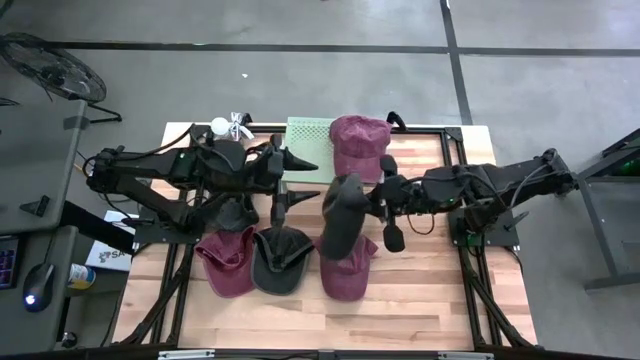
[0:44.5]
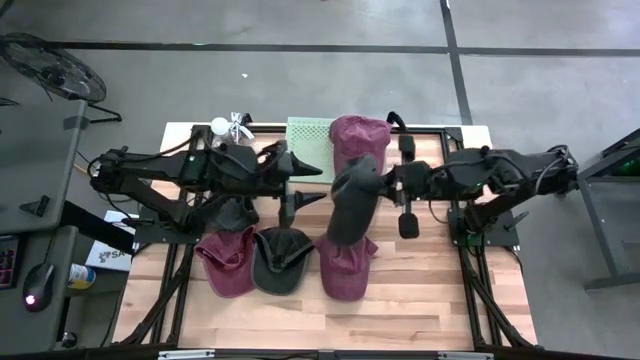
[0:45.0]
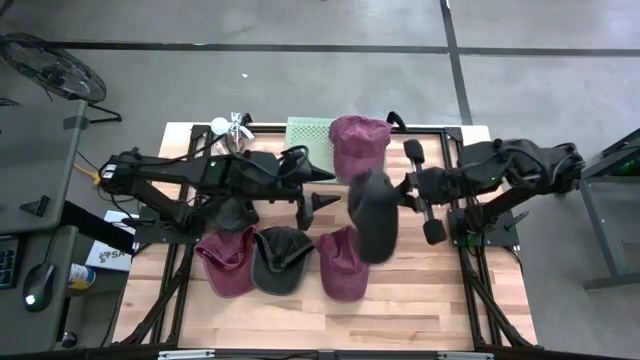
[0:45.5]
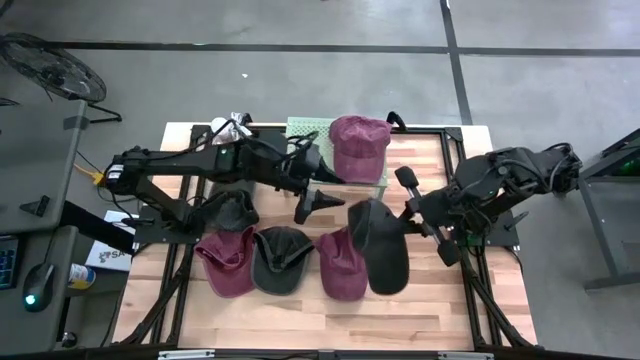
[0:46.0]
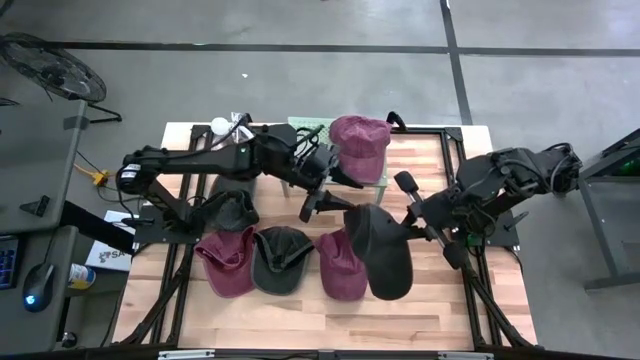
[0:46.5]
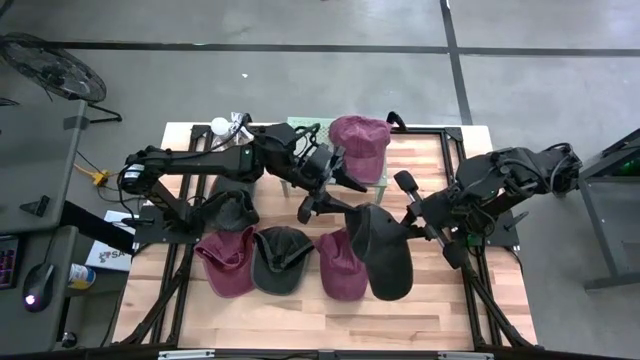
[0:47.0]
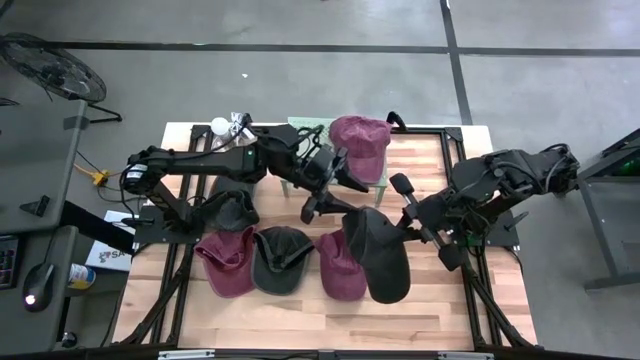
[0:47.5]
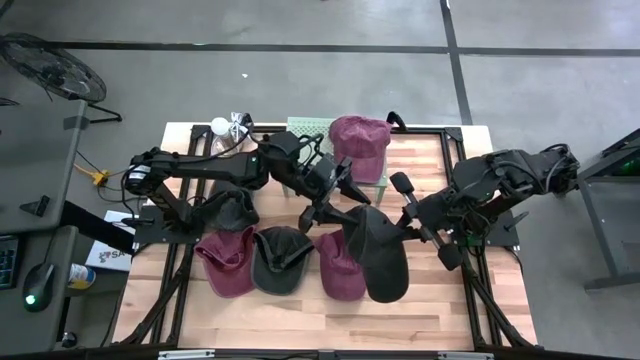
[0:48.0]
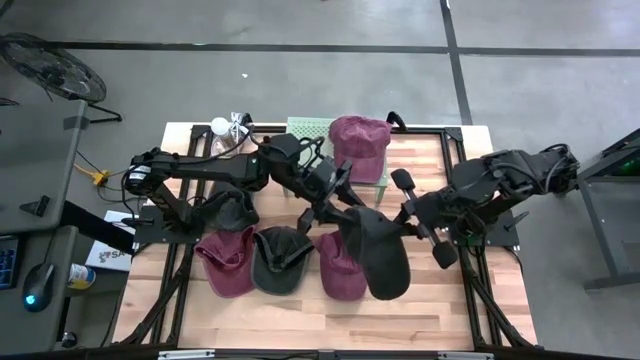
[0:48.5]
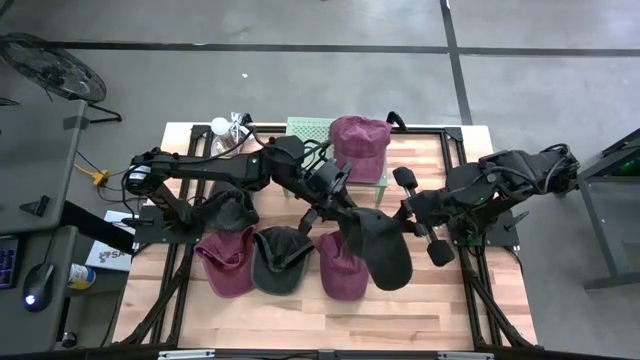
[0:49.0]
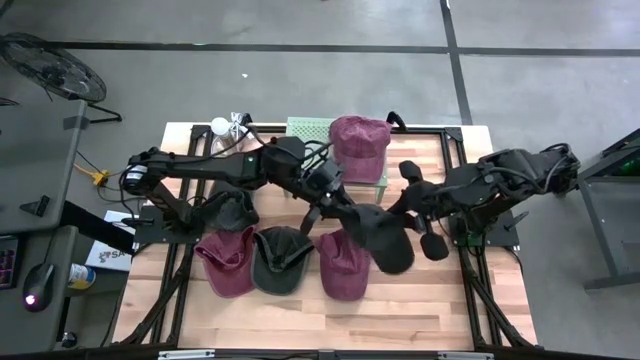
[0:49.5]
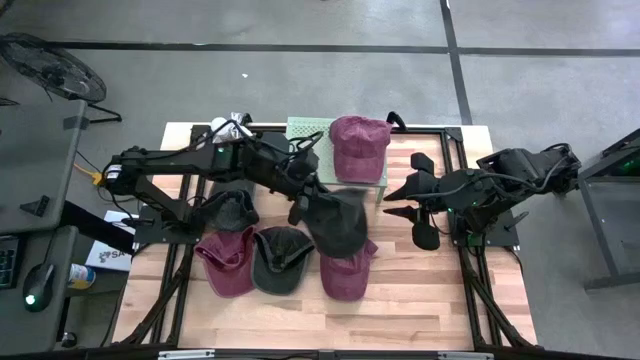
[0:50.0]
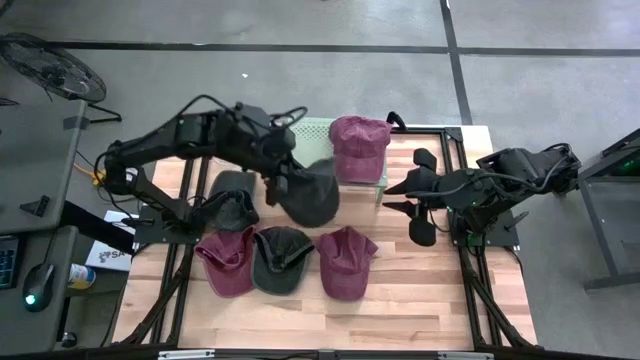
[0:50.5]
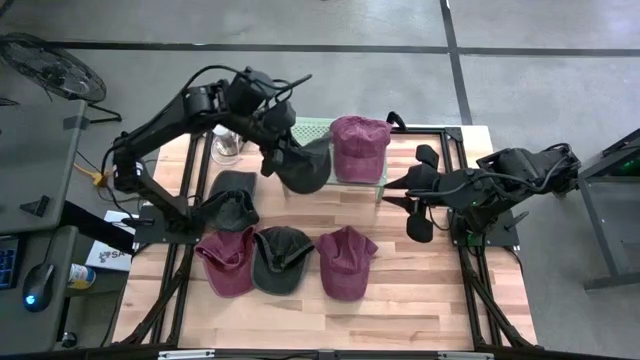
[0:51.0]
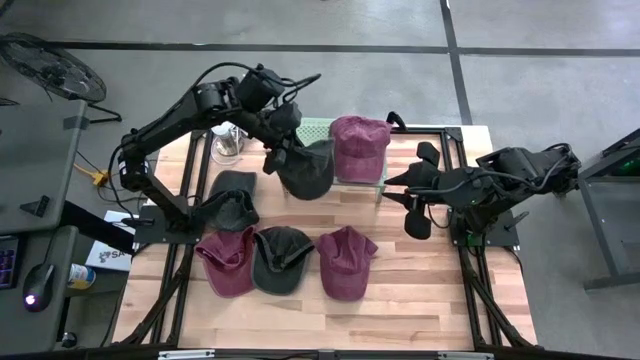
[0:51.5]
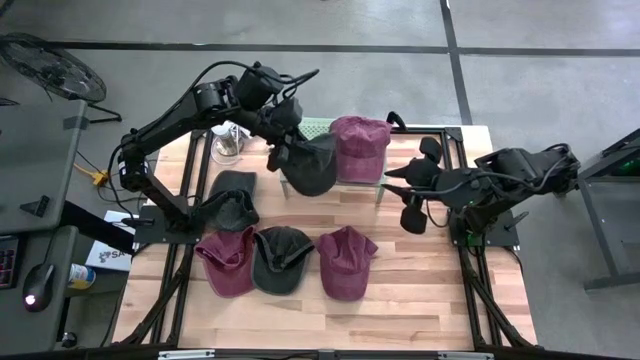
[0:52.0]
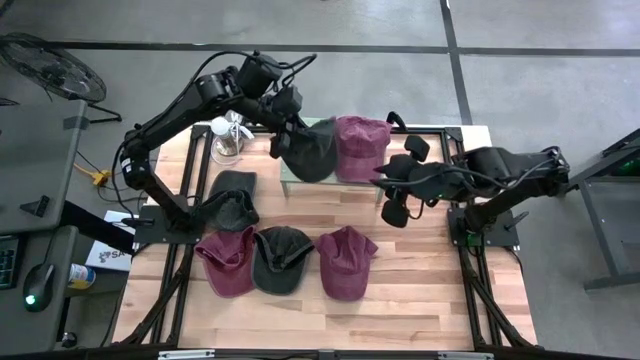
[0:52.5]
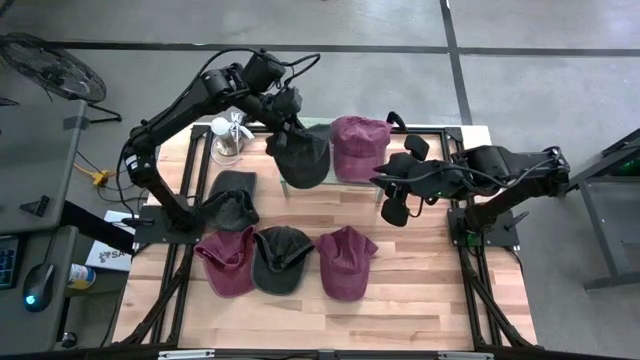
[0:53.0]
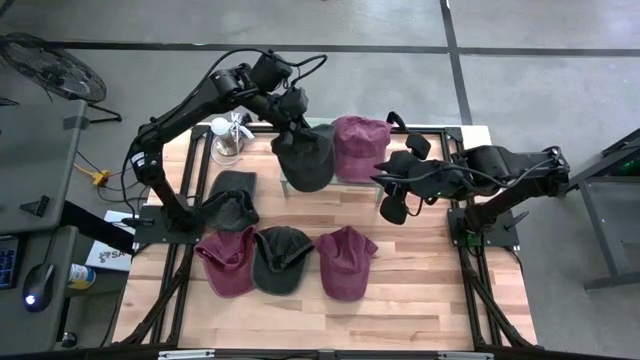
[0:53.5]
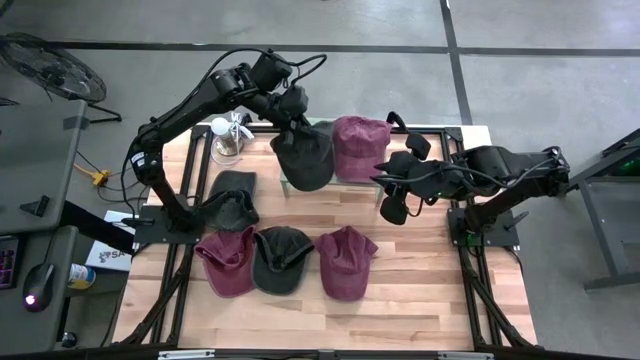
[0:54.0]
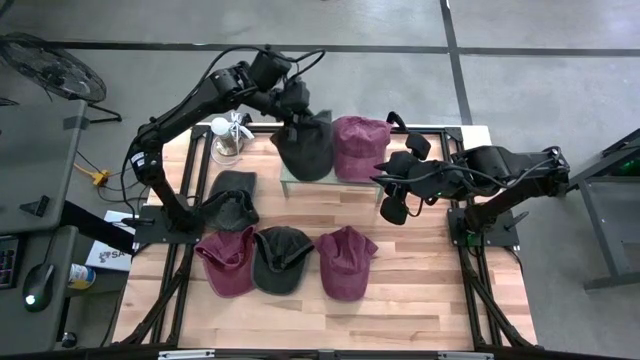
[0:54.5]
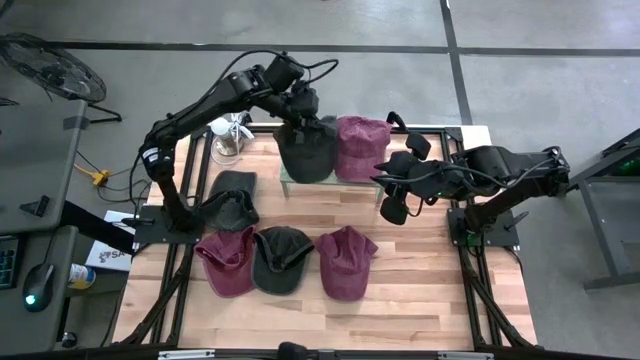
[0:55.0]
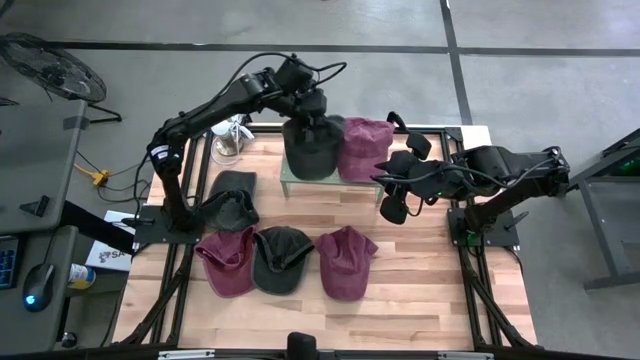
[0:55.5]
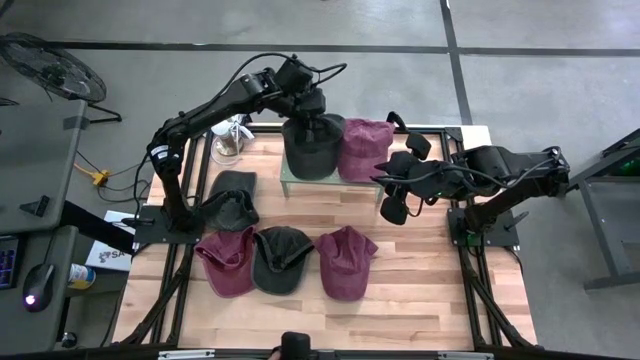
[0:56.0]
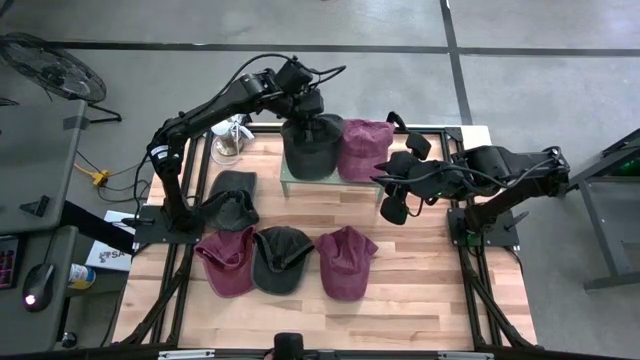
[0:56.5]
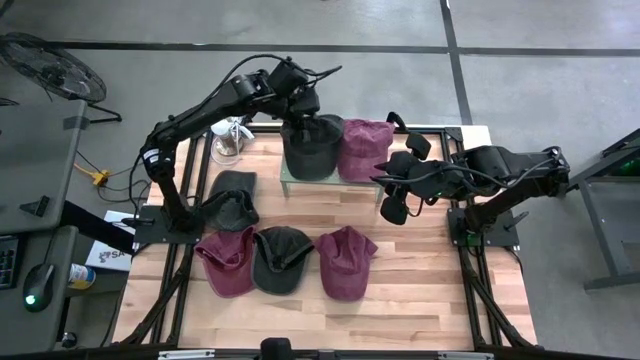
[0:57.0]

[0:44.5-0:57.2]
Task: Pick & Place hat
Put the bottom right black cap on the shelf
